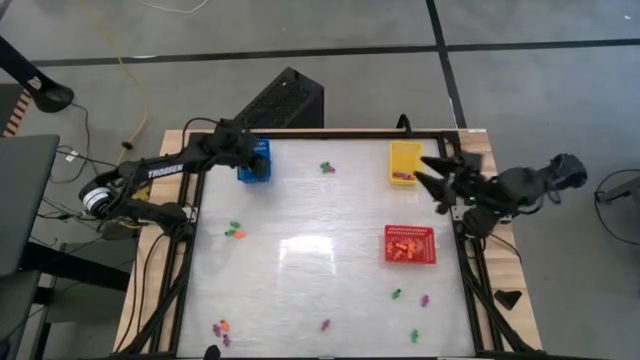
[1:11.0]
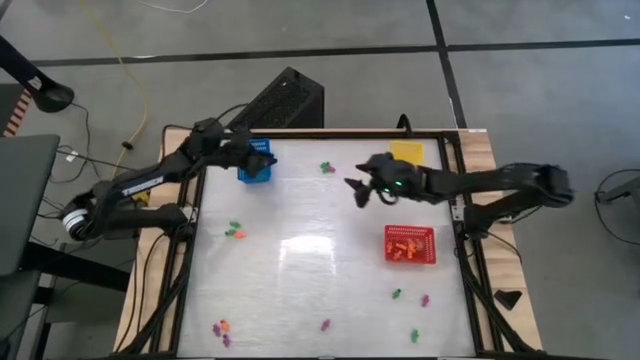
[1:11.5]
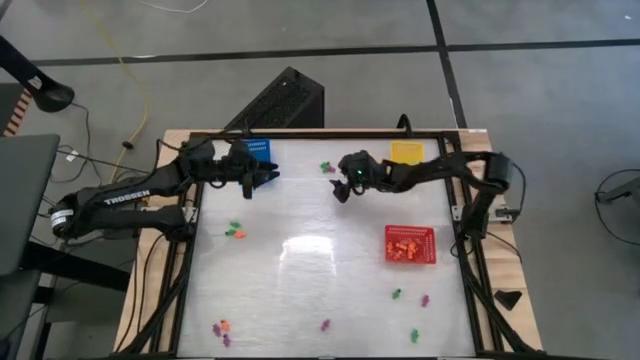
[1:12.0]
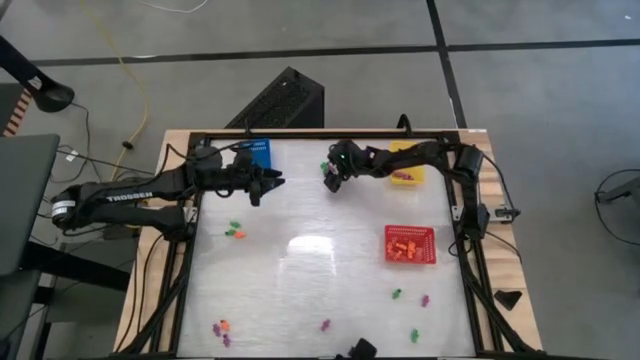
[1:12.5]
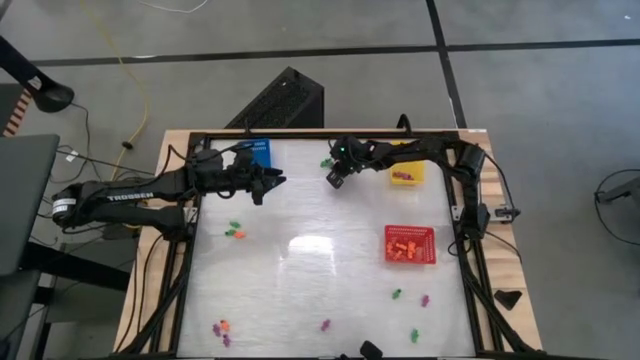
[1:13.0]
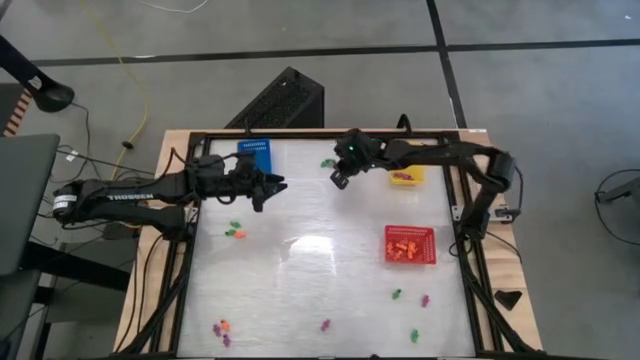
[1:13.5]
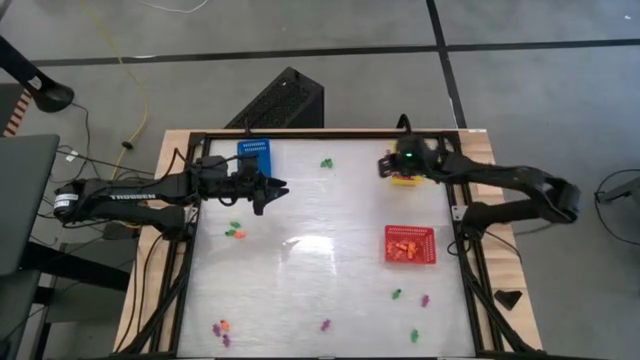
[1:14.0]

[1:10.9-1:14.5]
Task: Sort Halloween decoration
Put the purple skeleton toy into the yellow bin

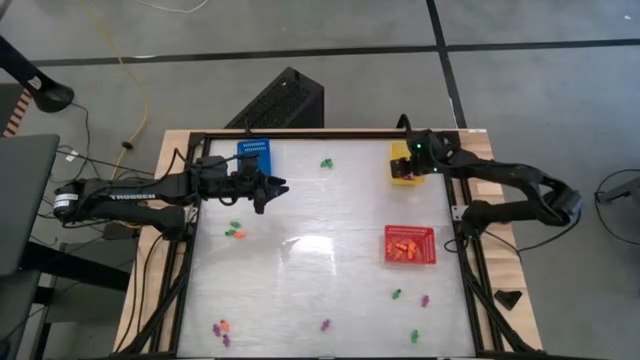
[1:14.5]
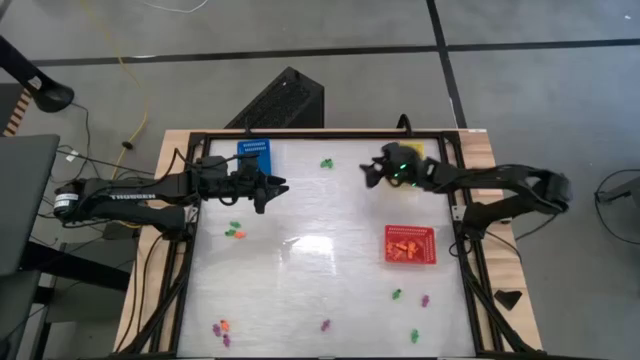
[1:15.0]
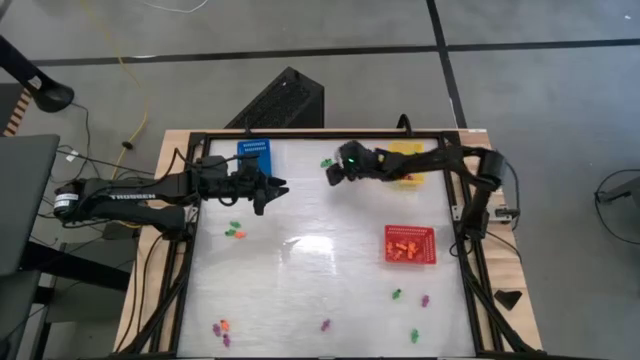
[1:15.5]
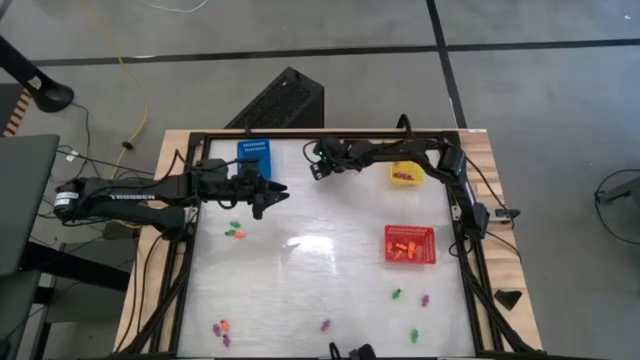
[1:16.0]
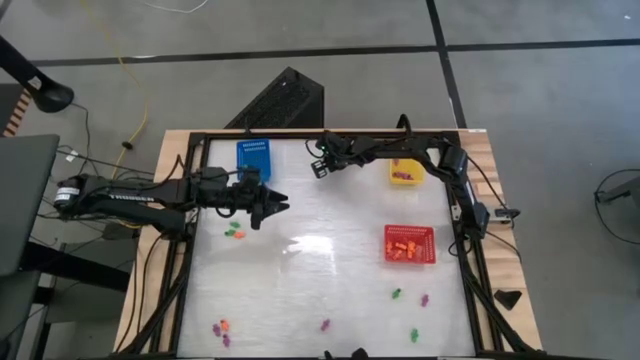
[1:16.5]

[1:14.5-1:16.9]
Put the green skeleton toy into the blue bin

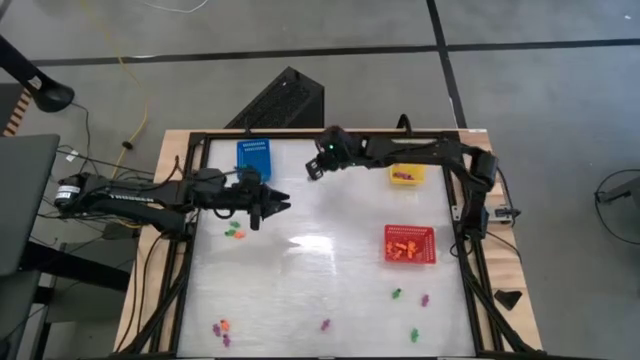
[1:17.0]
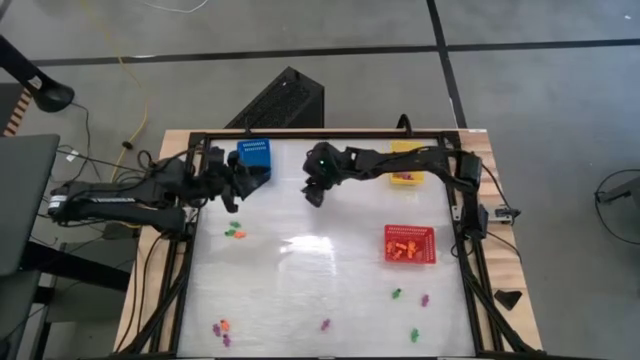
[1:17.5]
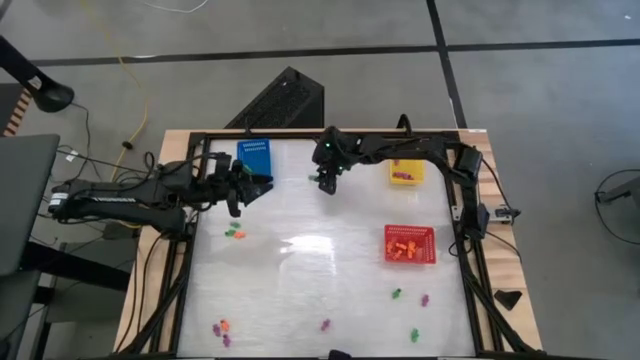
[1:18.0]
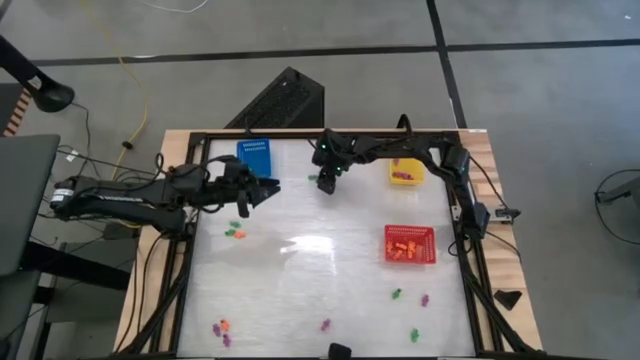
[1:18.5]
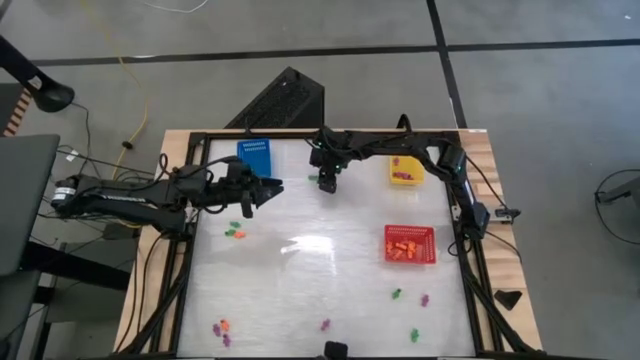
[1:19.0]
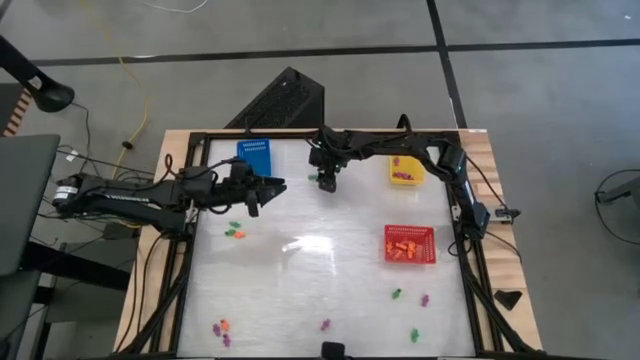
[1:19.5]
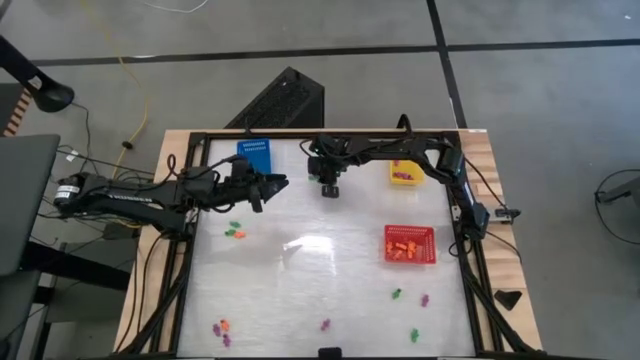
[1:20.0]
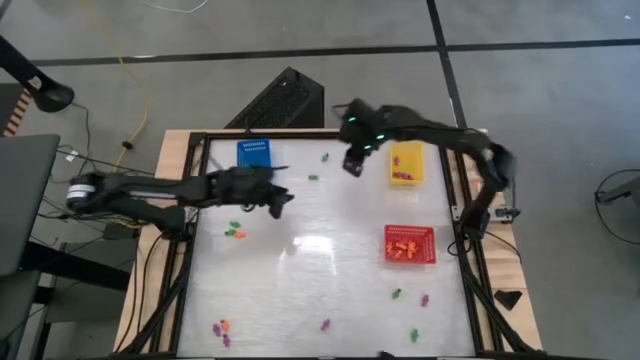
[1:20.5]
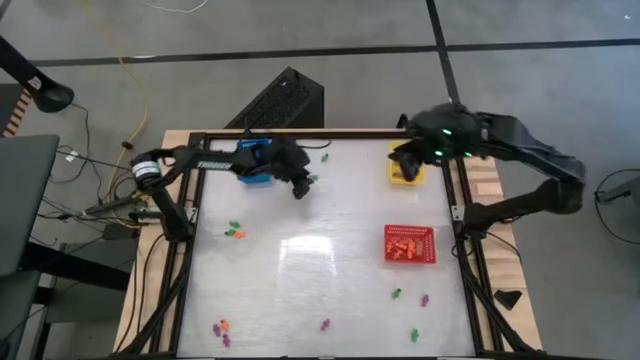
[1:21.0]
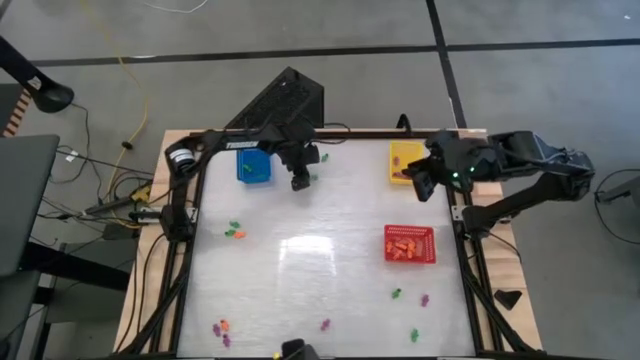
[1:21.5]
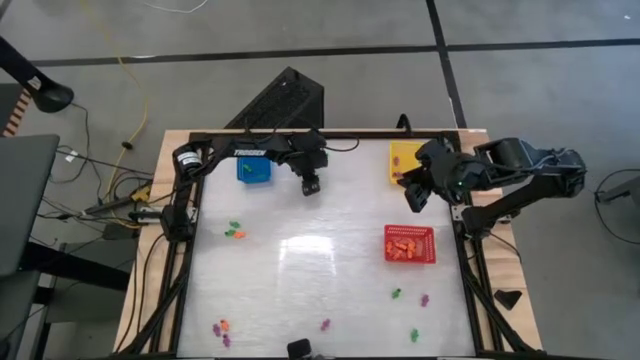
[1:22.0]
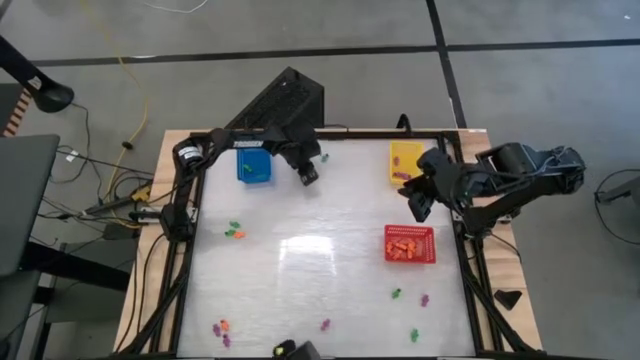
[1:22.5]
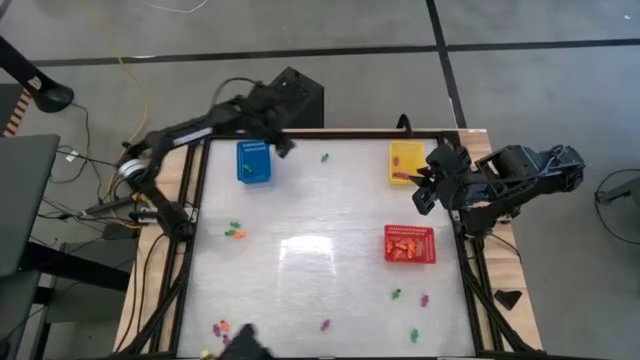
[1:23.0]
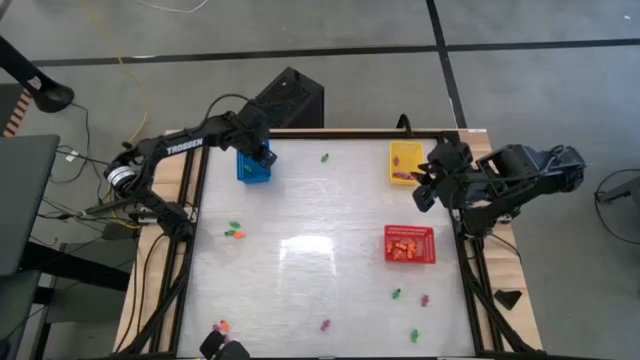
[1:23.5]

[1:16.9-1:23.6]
Put the green skeleton toy into the blue bin

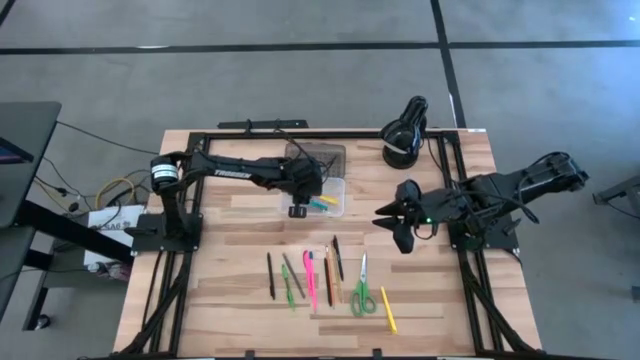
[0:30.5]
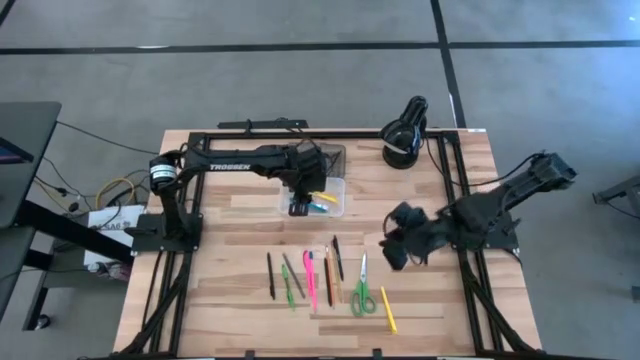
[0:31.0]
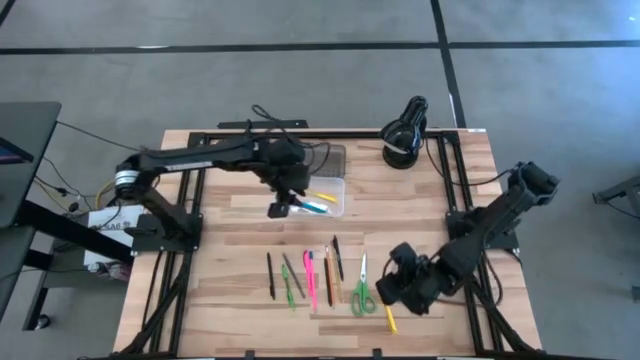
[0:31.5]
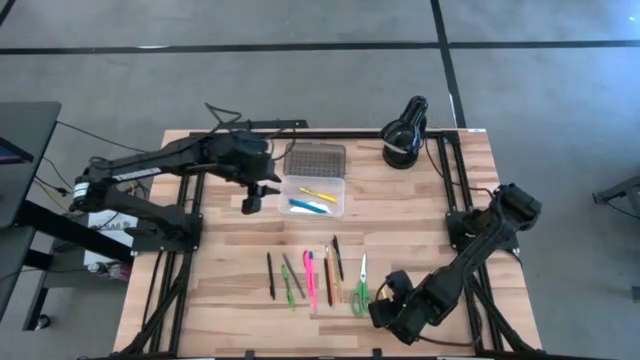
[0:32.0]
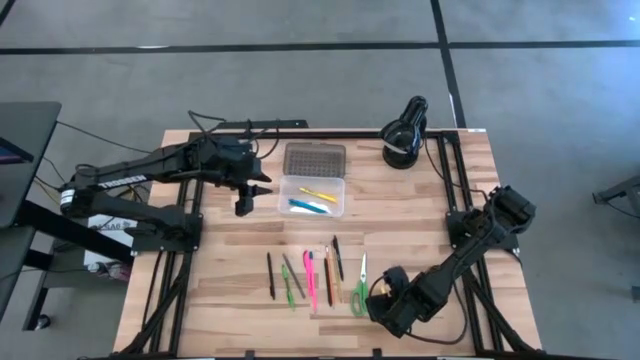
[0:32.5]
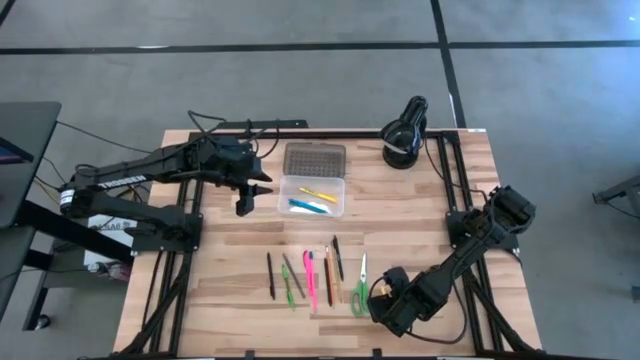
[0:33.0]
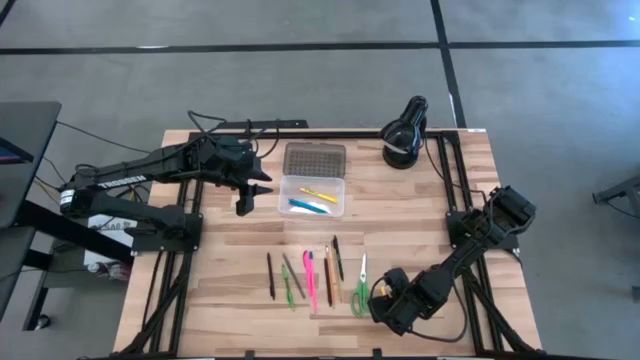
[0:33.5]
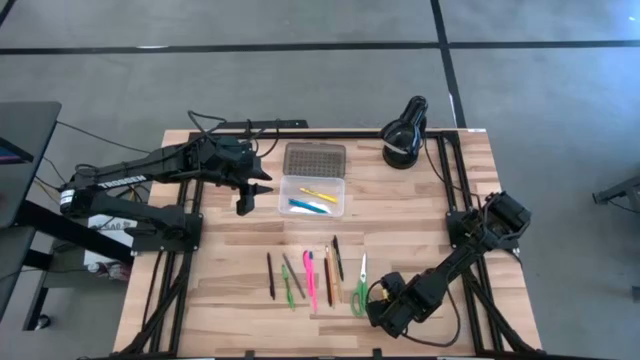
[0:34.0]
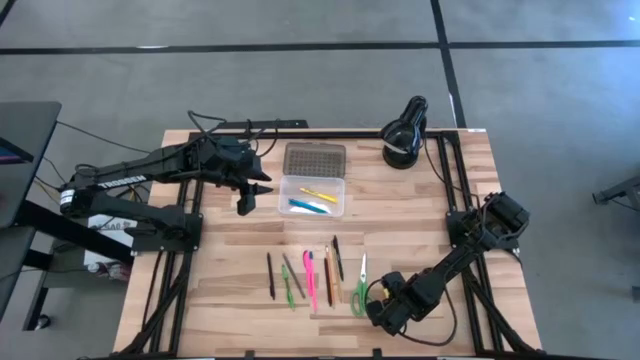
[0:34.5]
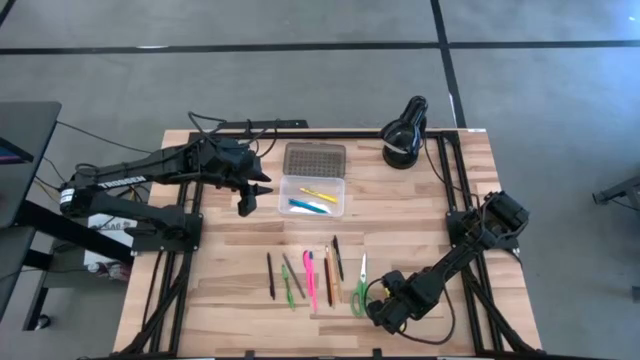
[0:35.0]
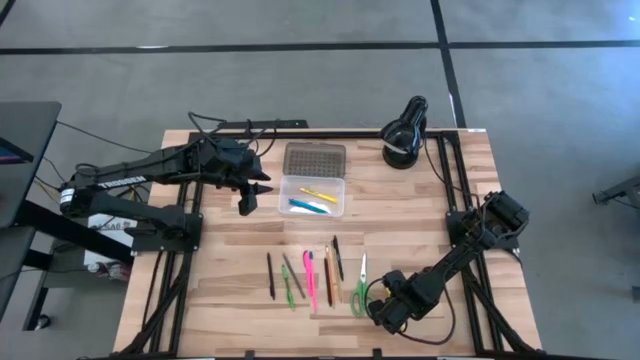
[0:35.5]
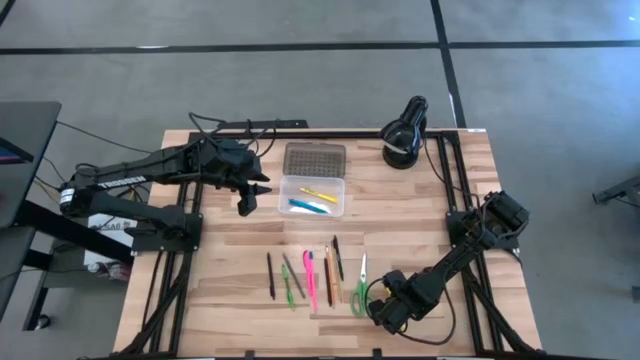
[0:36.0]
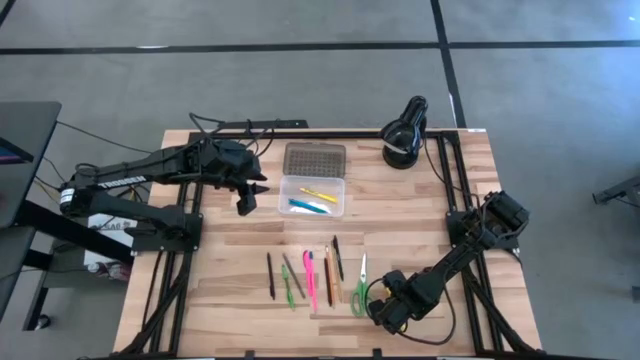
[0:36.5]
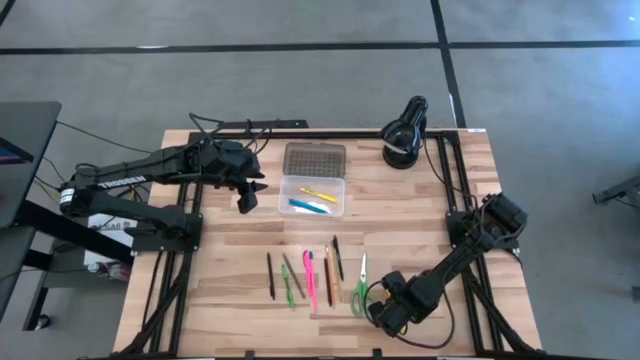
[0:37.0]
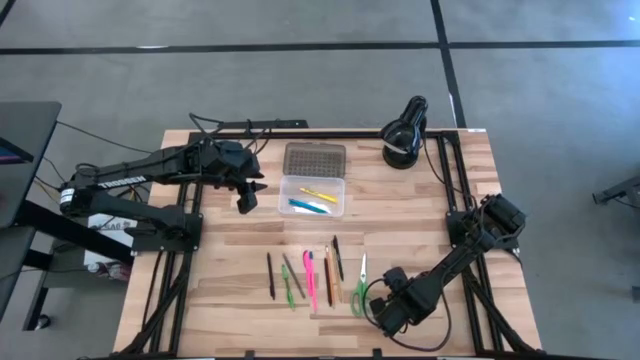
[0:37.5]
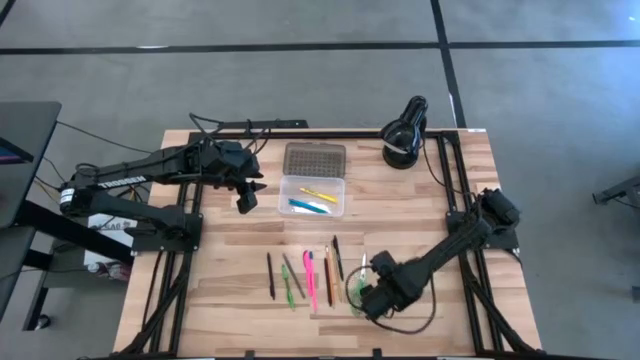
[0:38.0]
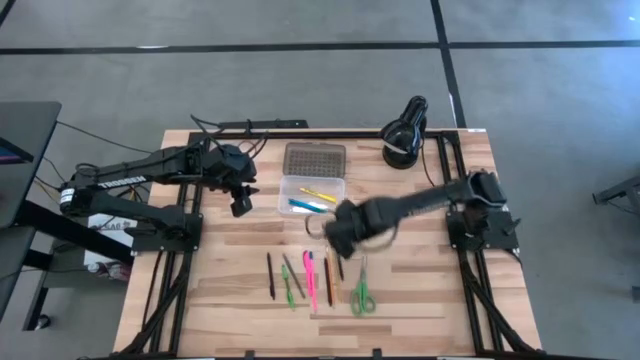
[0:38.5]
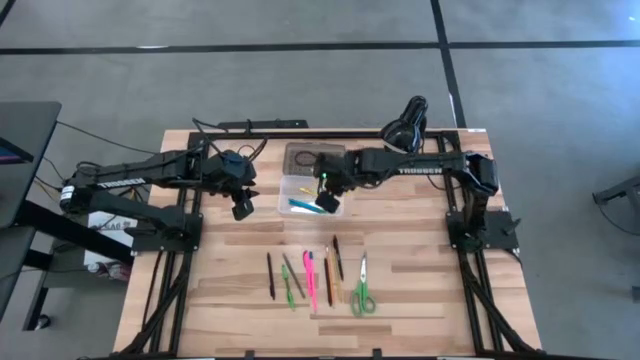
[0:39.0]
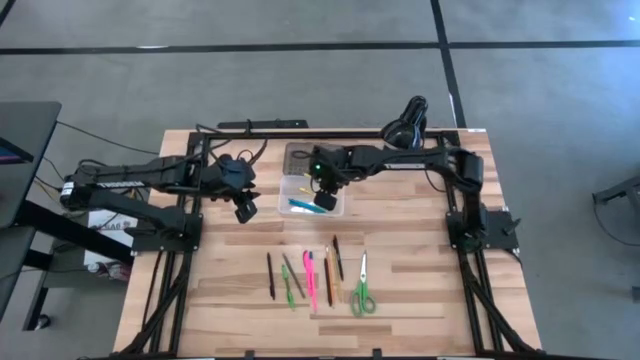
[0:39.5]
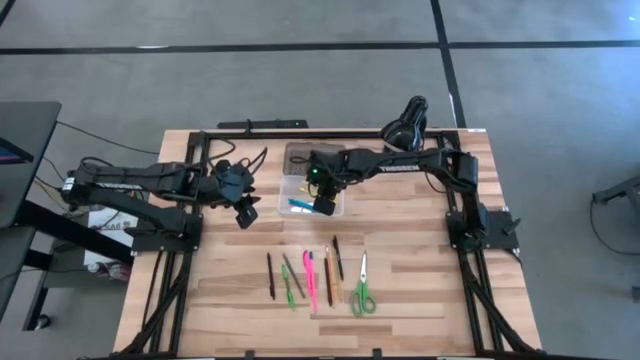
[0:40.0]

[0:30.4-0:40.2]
Task: Pick & place school supplies into a supply box
Put the yellow pen into the supply box
